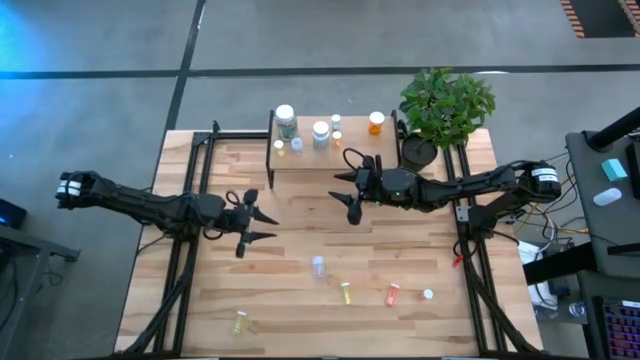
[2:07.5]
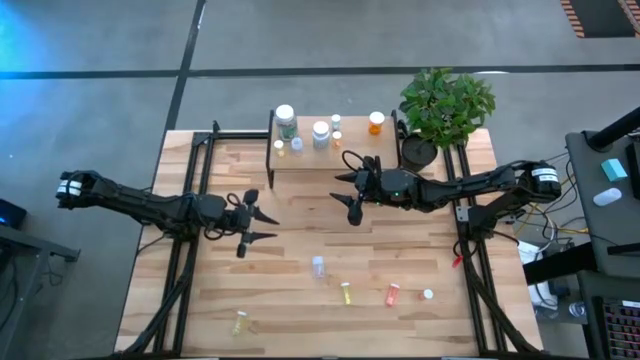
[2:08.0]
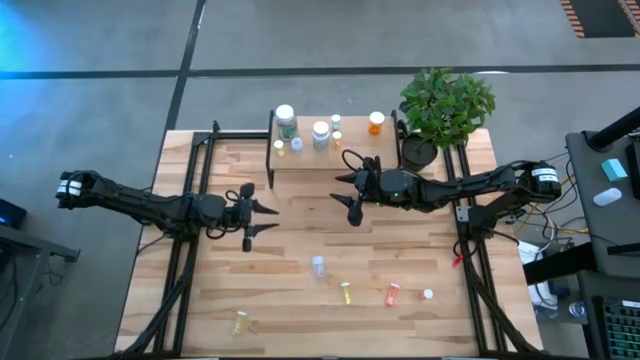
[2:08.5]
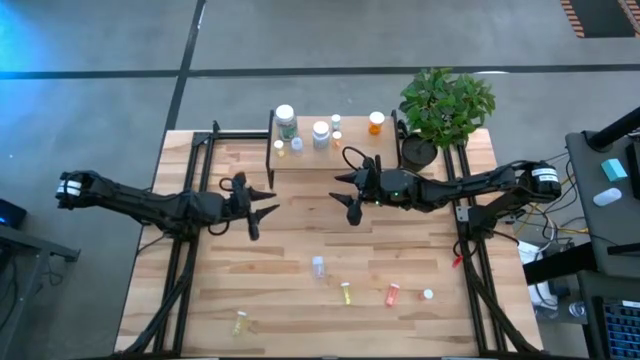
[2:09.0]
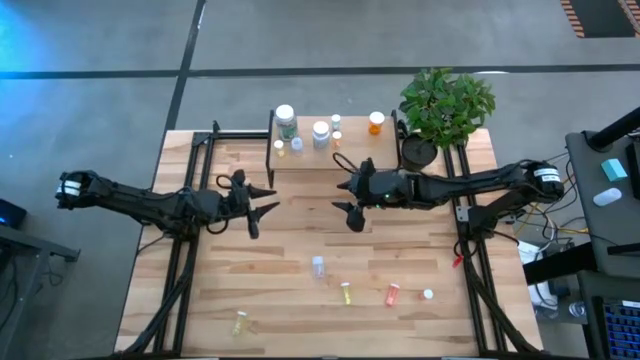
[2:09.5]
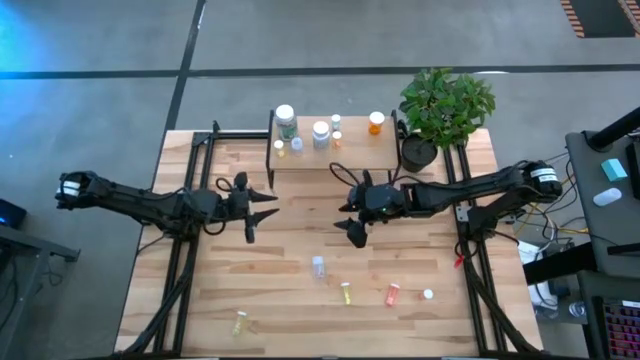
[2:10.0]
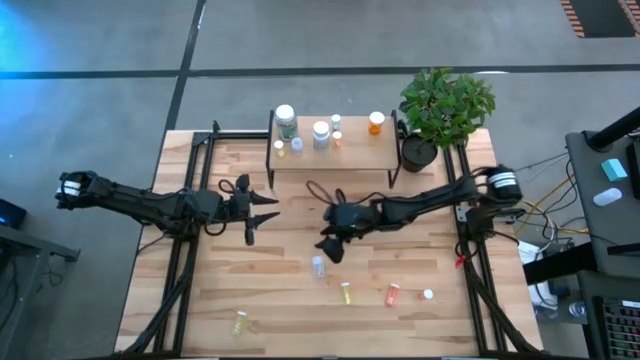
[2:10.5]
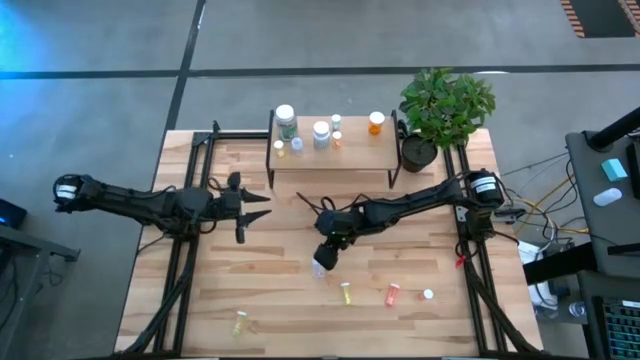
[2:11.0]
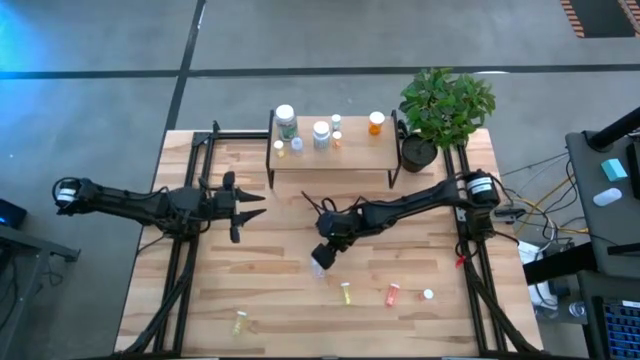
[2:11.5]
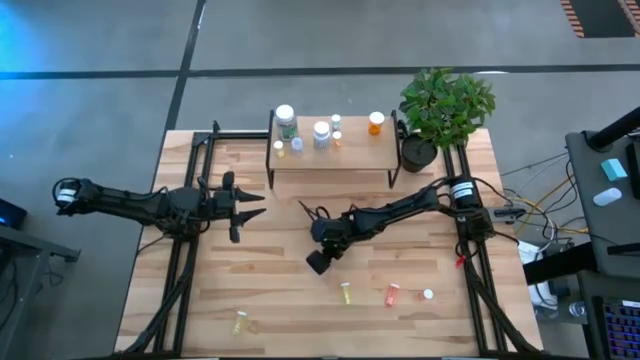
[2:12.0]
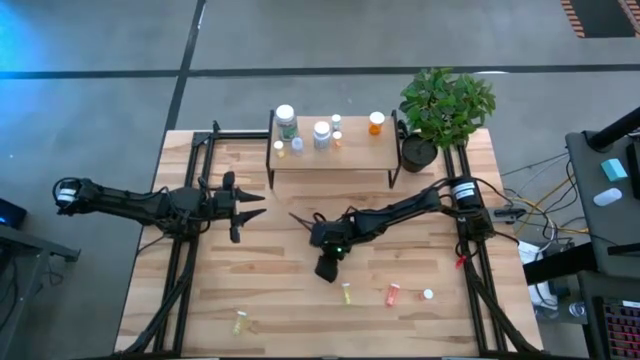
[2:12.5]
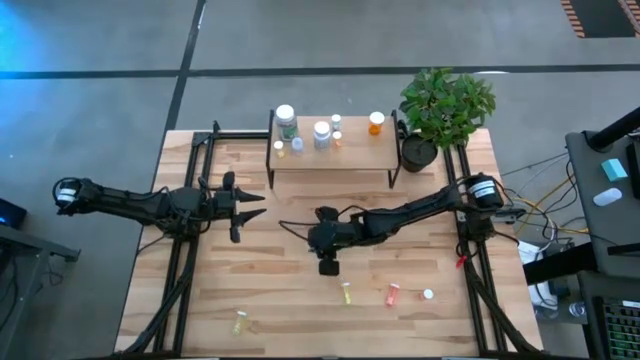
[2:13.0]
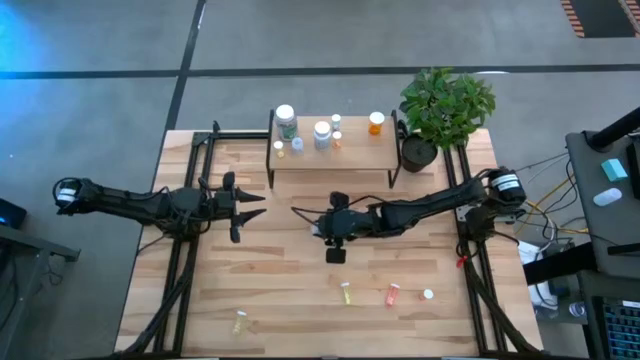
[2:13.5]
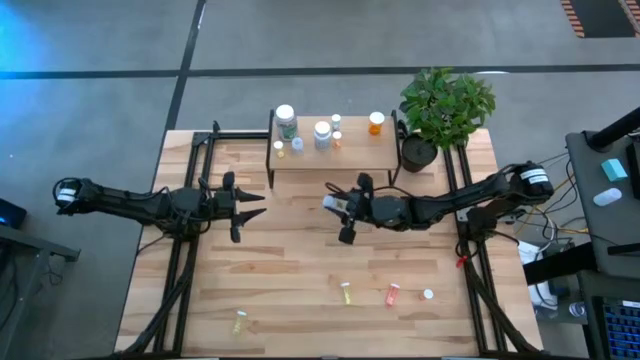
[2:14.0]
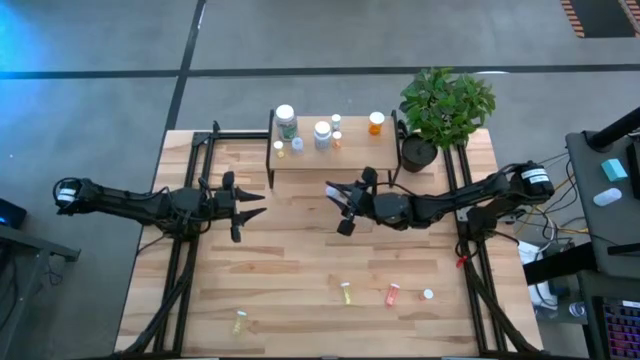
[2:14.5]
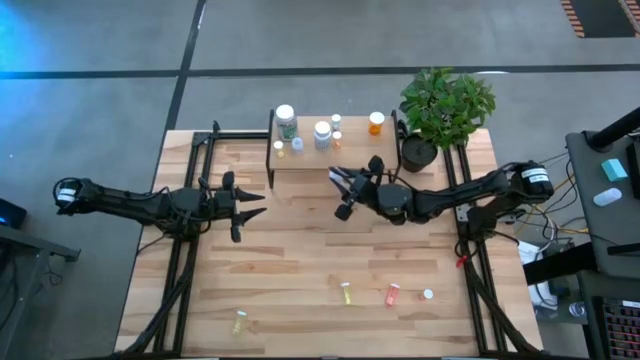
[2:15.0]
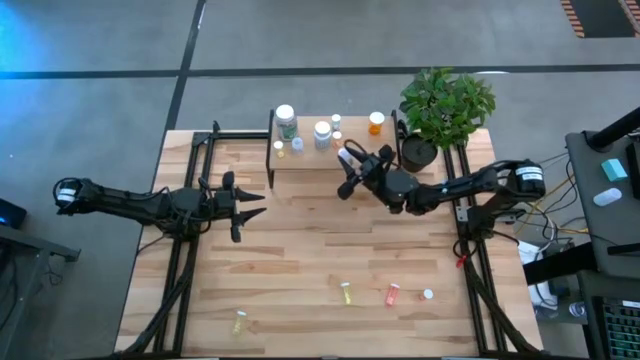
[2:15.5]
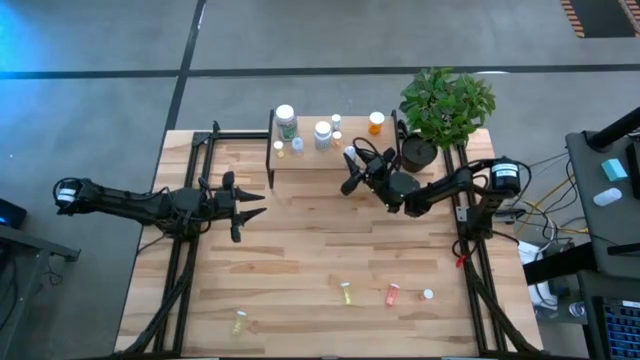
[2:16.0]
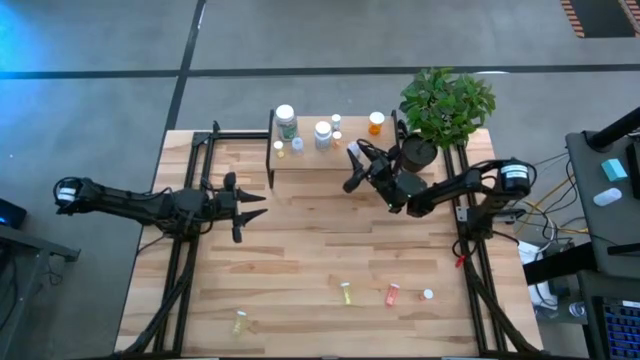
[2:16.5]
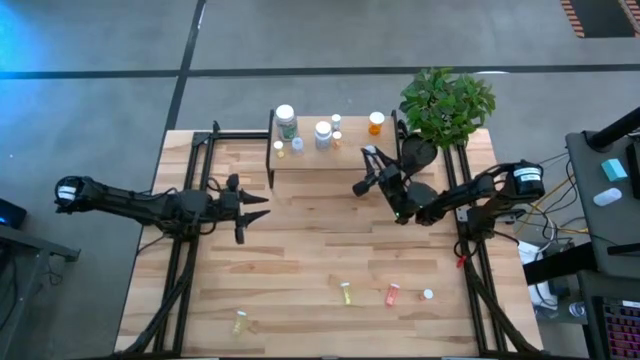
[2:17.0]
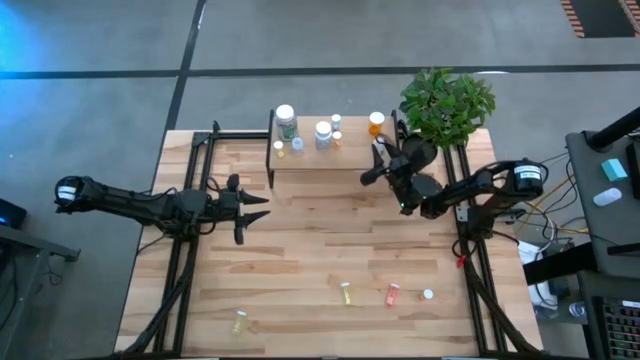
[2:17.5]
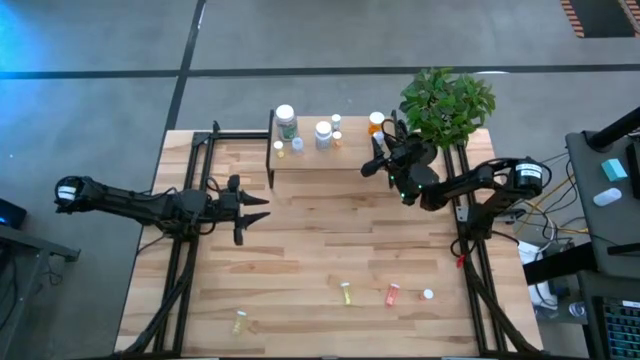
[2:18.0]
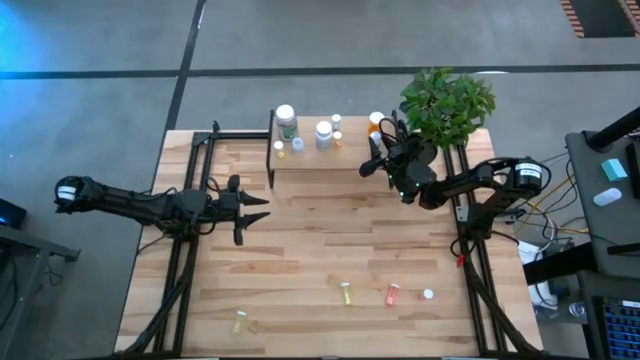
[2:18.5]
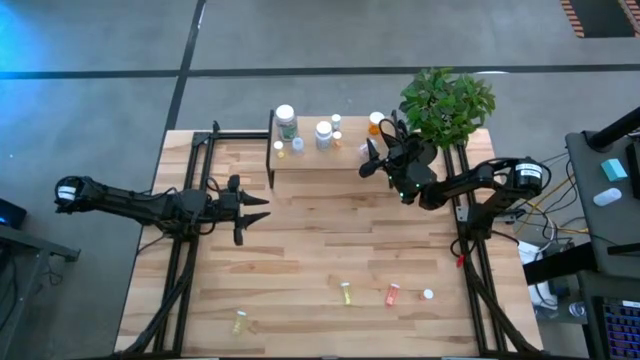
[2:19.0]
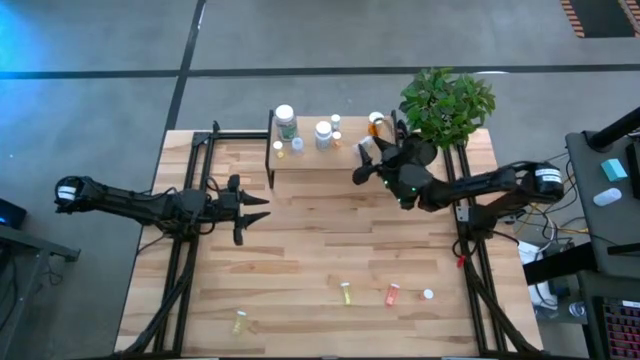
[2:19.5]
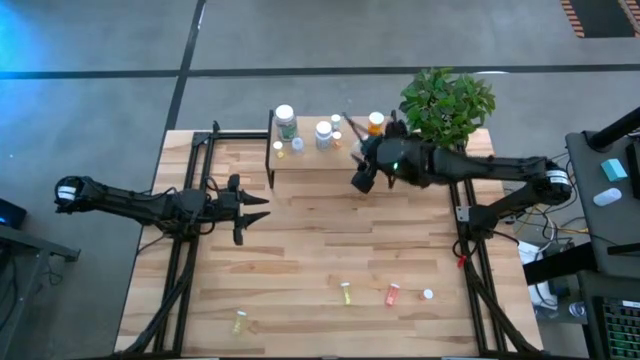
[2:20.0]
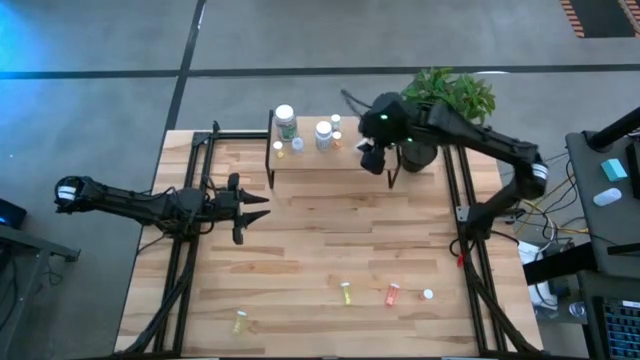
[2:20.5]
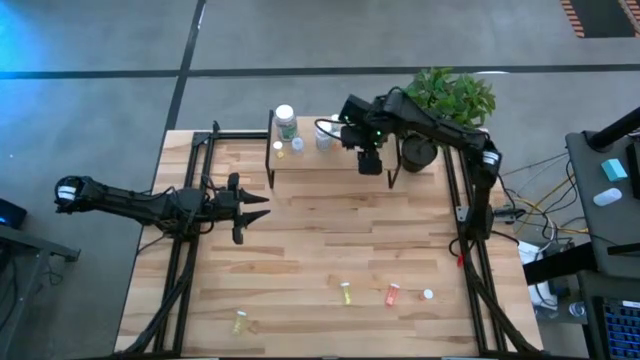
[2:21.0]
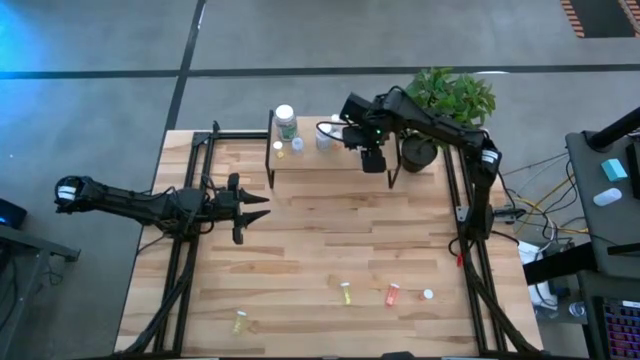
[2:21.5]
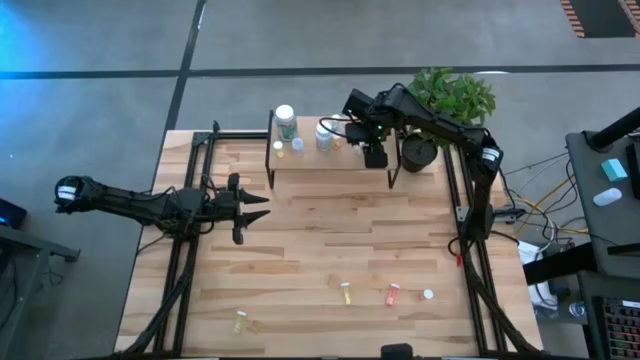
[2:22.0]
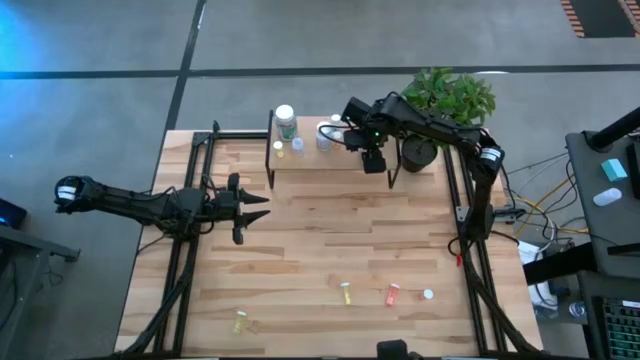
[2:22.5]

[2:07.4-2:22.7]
Task: Pick and place medicine bottles onto shelf by color
Put the transparent pill bottle on the shelf

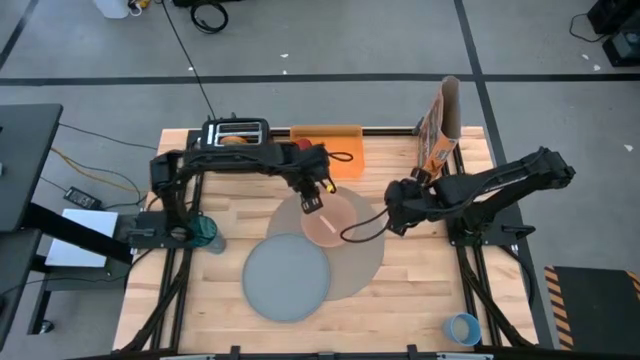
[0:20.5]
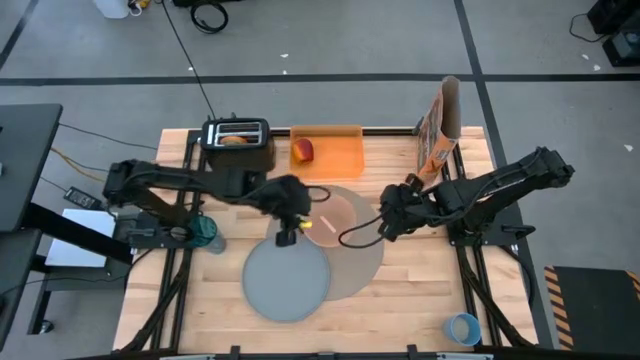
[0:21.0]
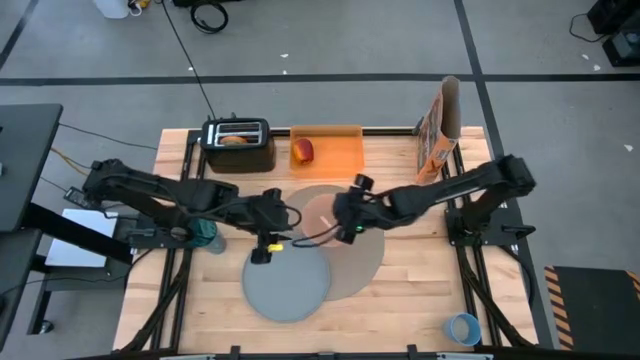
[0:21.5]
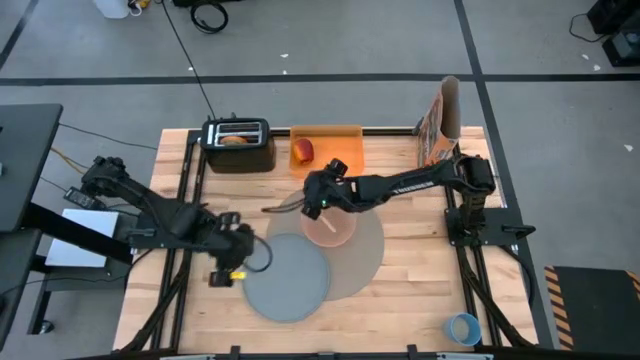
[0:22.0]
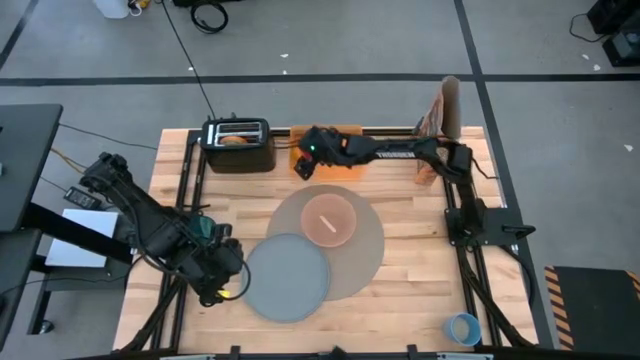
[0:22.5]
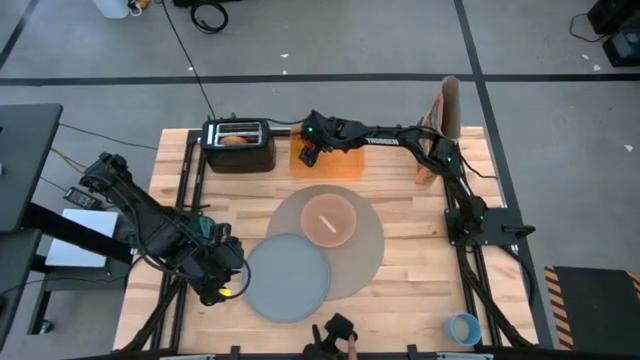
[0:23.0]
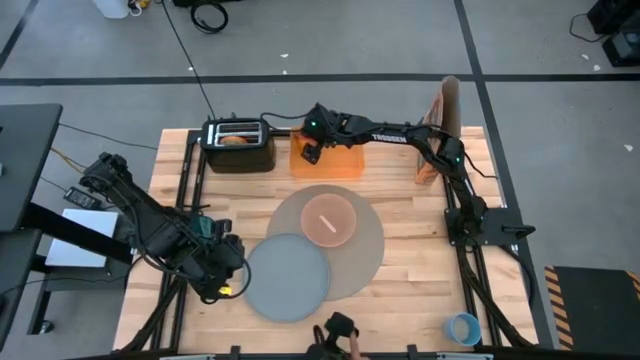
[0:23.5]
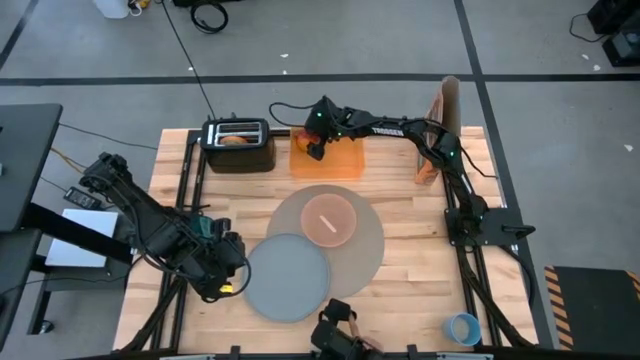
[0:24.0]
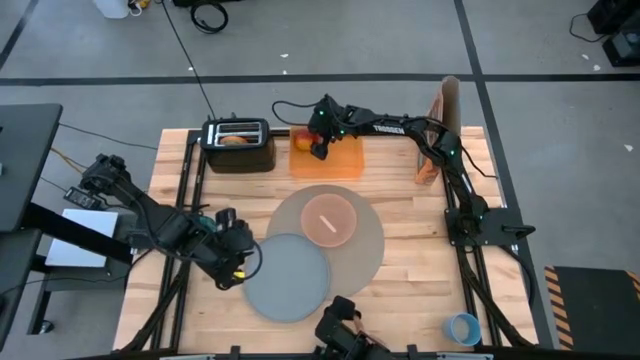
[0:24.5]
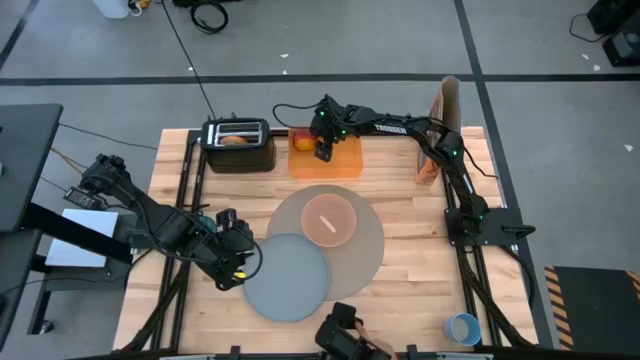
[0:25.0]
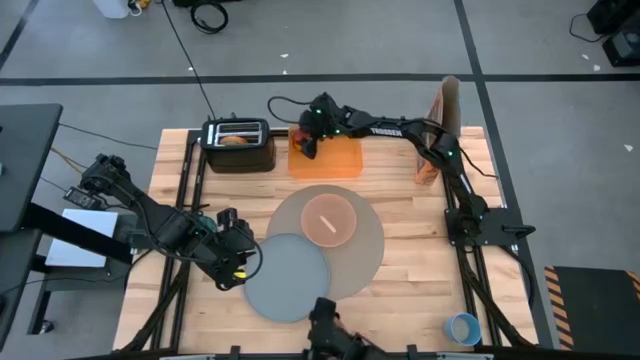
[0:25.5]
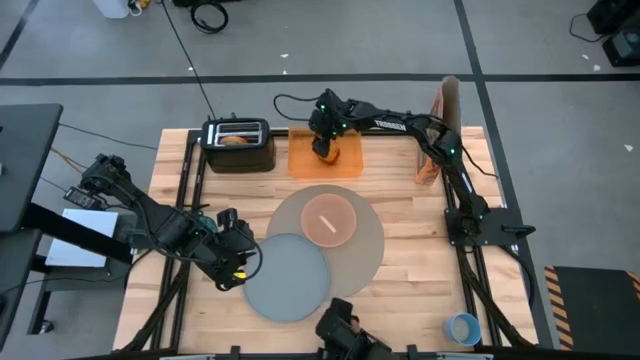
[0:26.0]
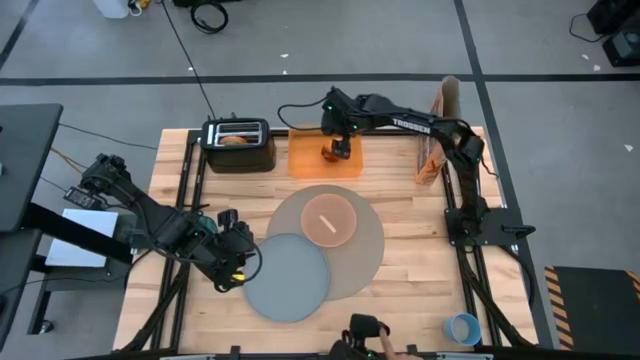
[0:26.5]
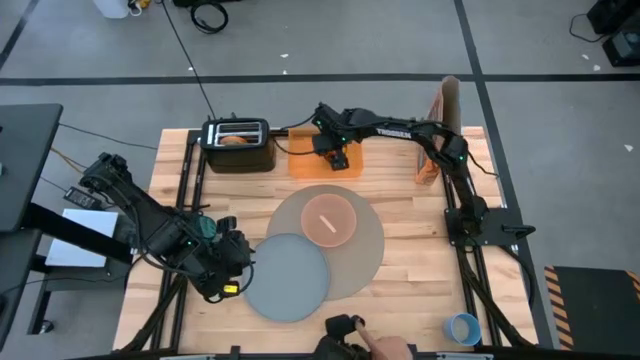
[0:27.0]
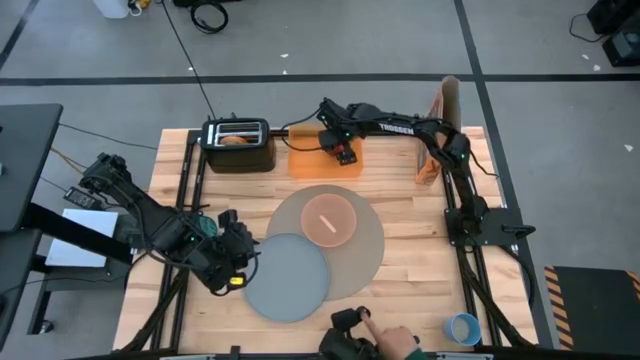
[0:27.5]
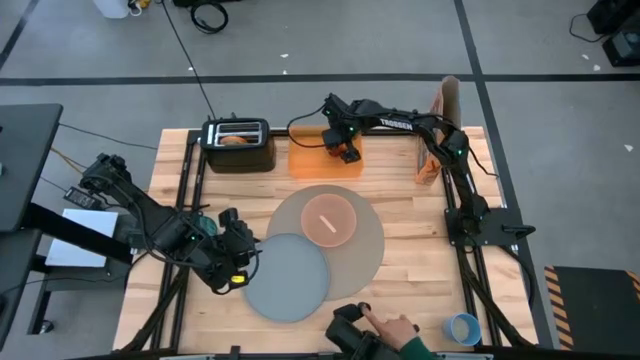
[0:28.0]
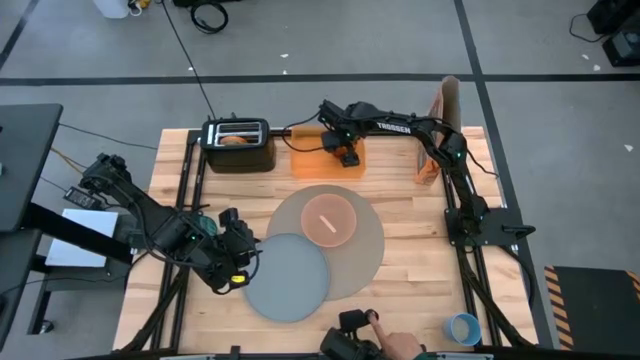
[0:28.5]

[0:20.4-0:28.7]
Task: Arrange a breakfast setting
Put the red apple on the brown tablemat
